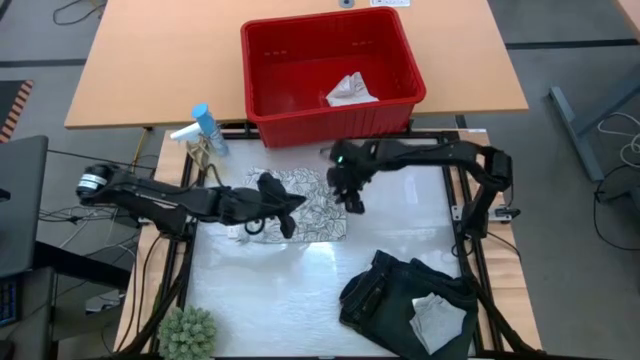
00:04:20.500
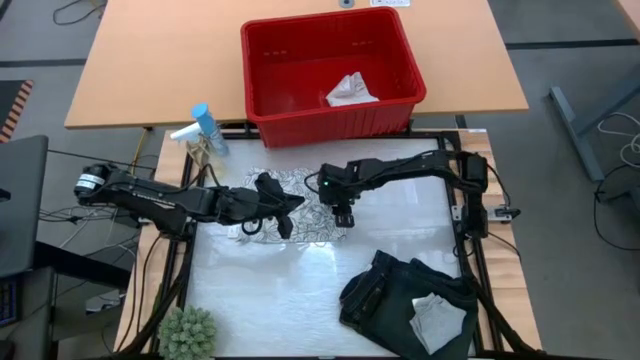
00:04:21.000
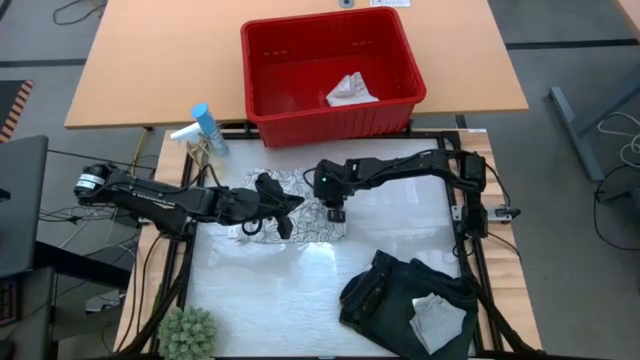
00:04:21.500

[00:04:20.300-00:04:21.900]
Task: Fold Laundry from Bin
Fold the white from the red laundry bin

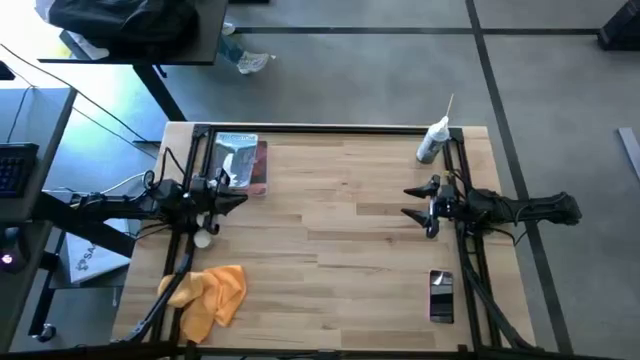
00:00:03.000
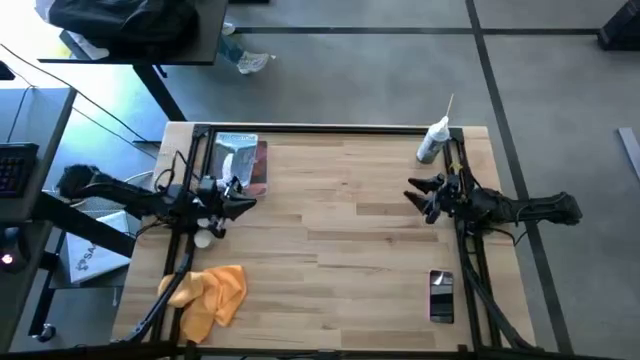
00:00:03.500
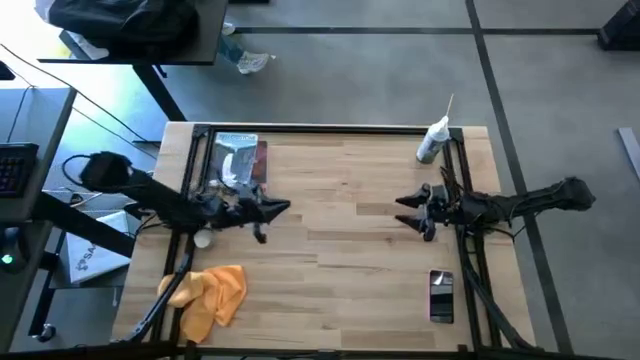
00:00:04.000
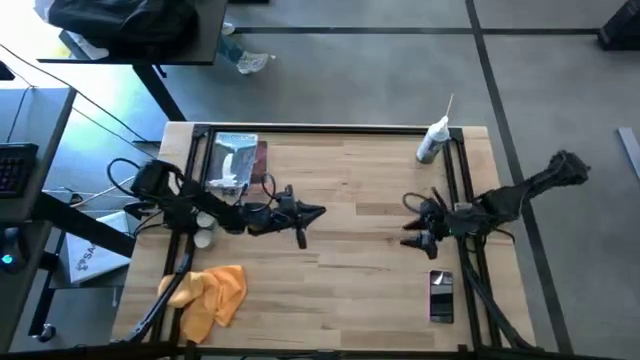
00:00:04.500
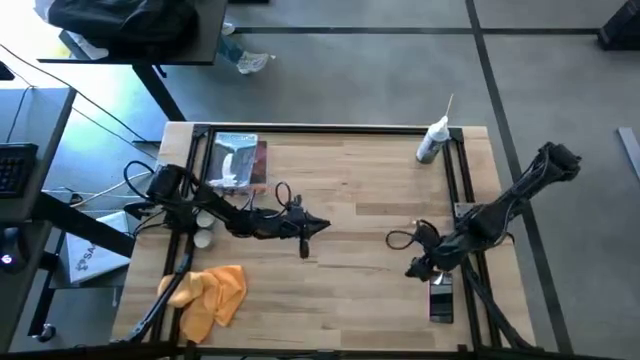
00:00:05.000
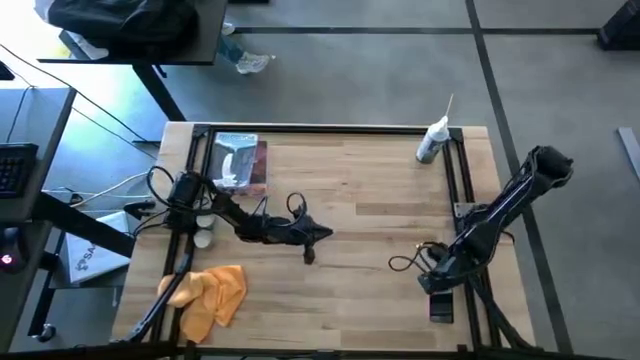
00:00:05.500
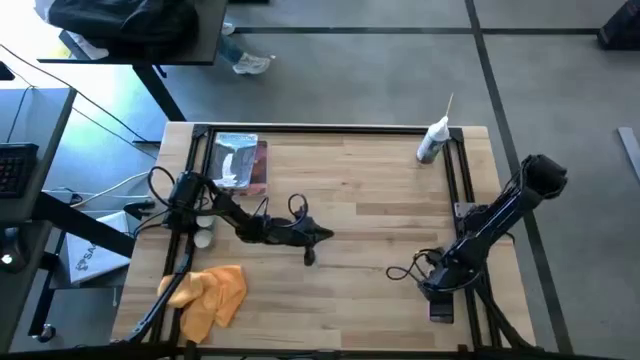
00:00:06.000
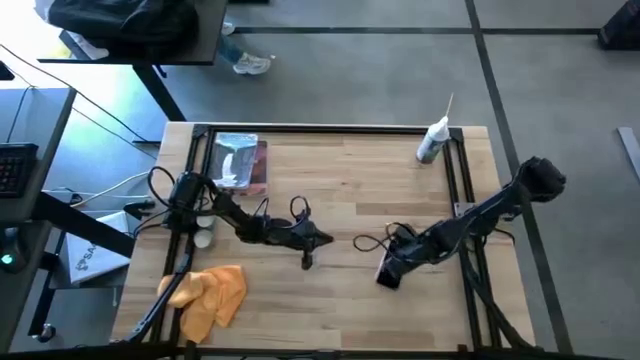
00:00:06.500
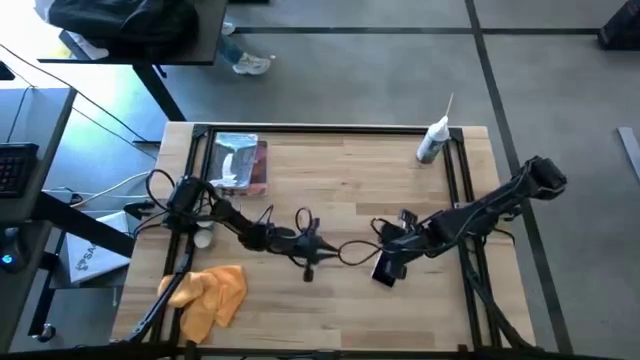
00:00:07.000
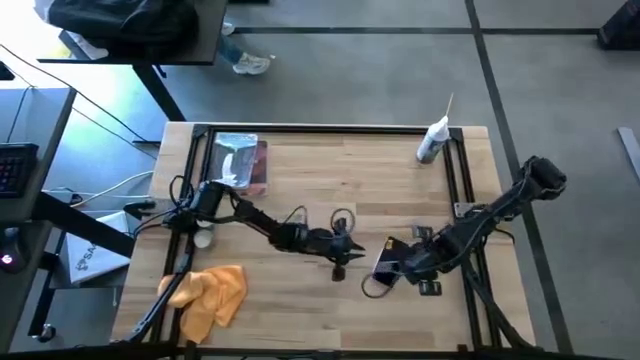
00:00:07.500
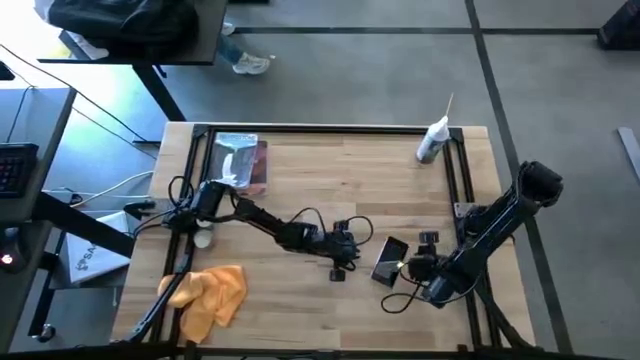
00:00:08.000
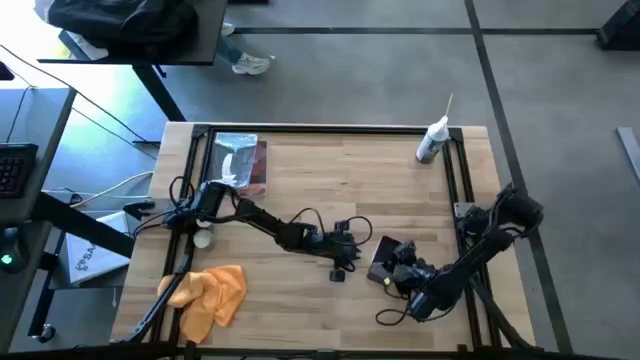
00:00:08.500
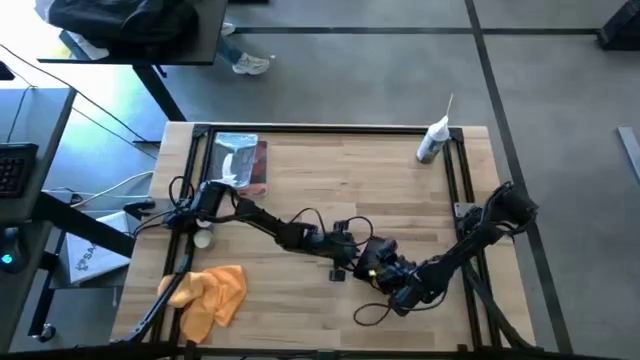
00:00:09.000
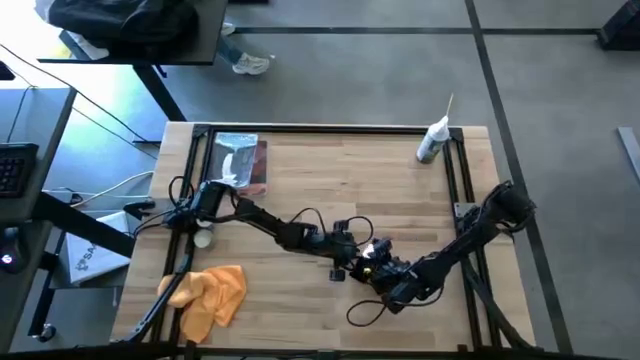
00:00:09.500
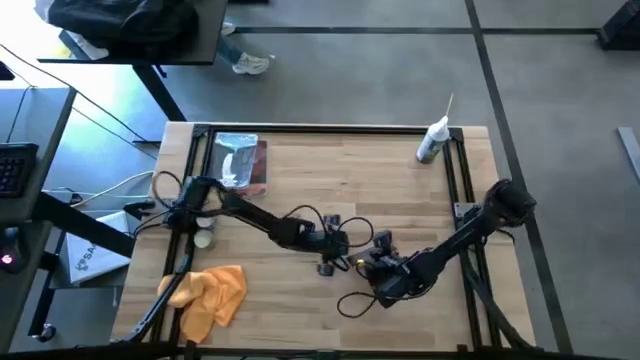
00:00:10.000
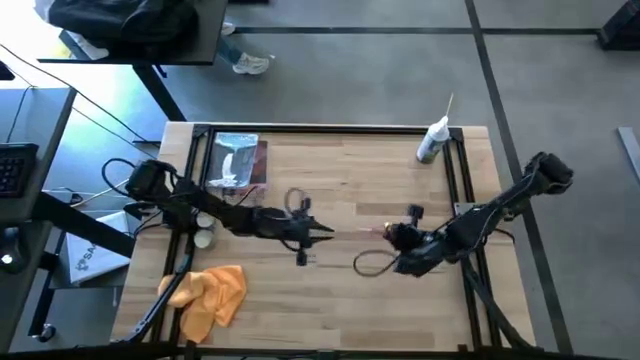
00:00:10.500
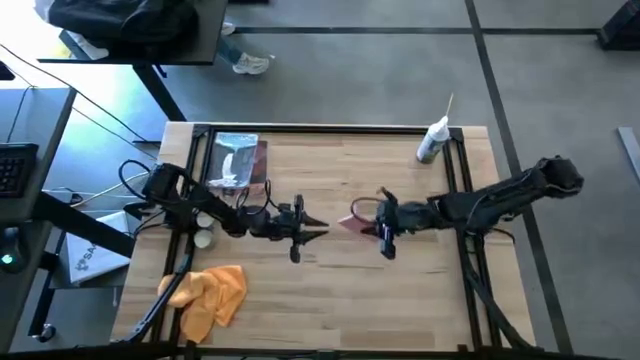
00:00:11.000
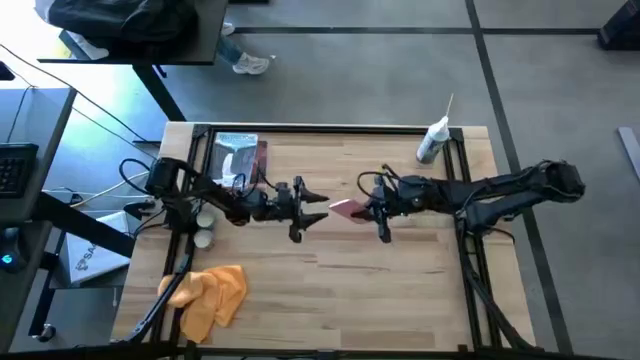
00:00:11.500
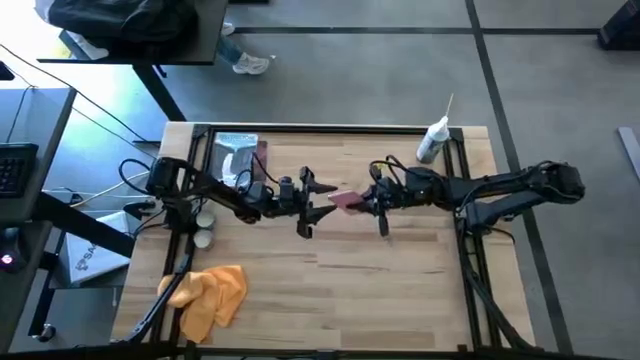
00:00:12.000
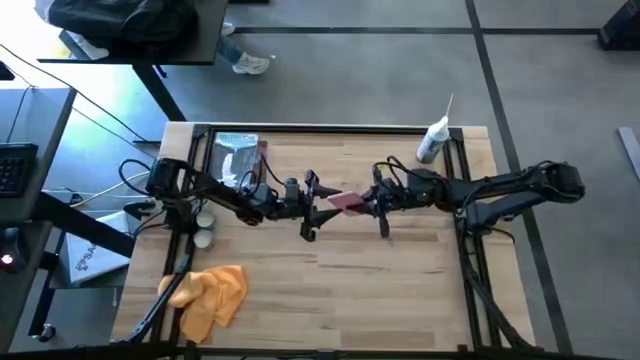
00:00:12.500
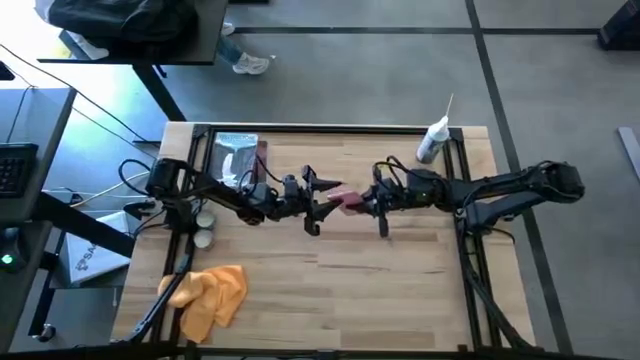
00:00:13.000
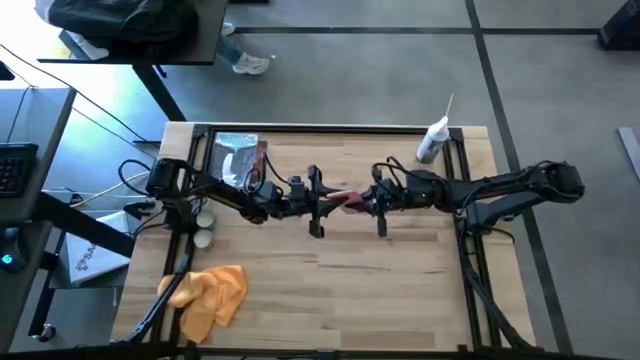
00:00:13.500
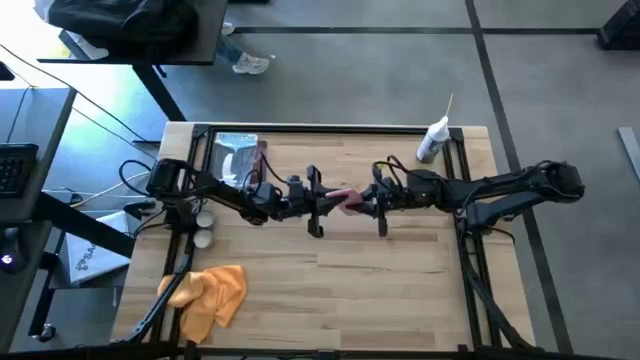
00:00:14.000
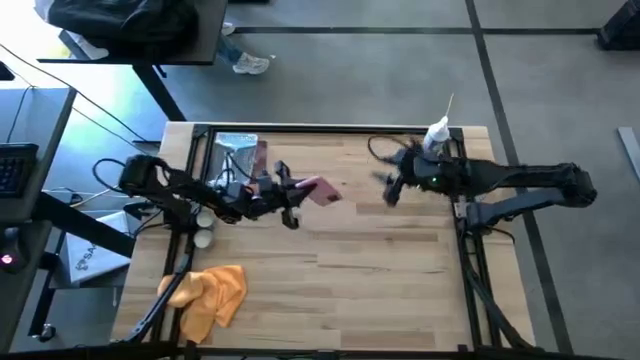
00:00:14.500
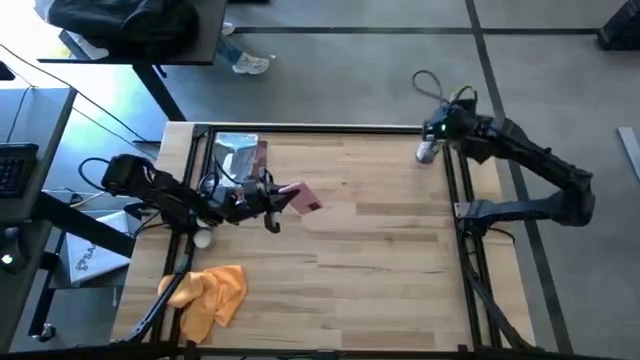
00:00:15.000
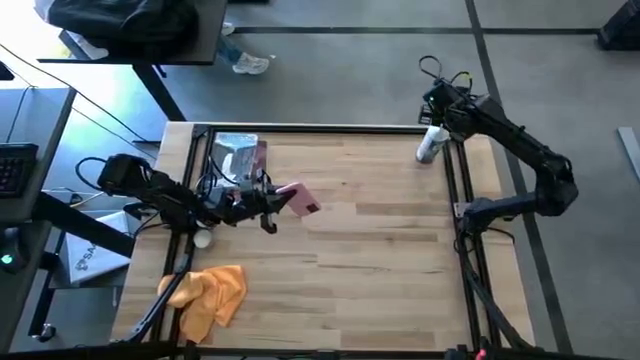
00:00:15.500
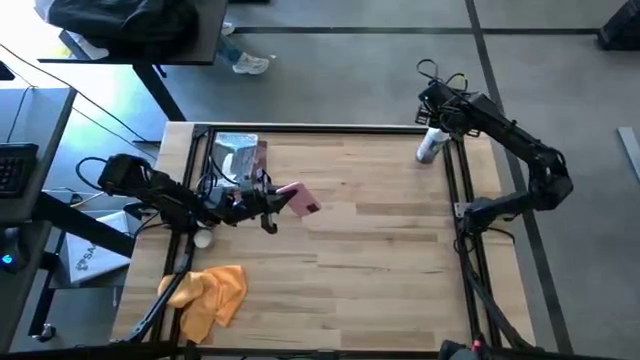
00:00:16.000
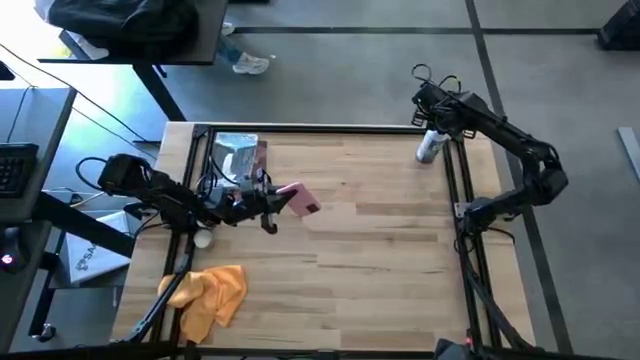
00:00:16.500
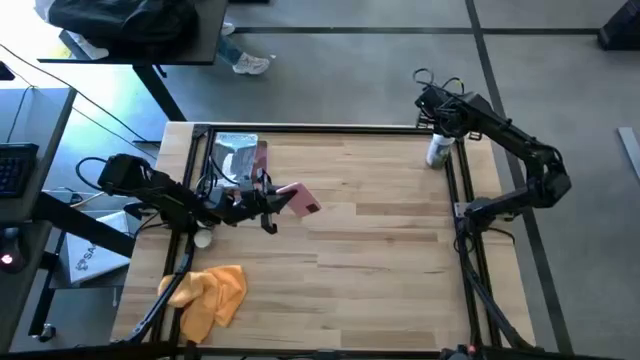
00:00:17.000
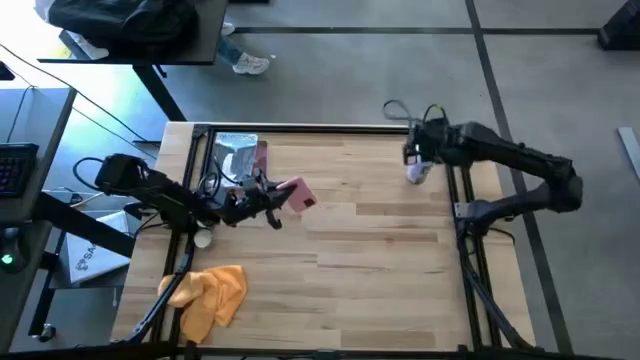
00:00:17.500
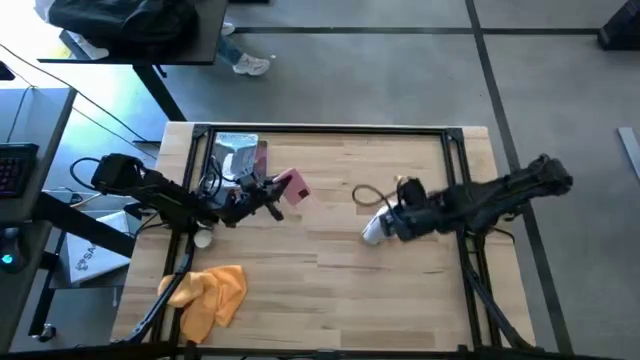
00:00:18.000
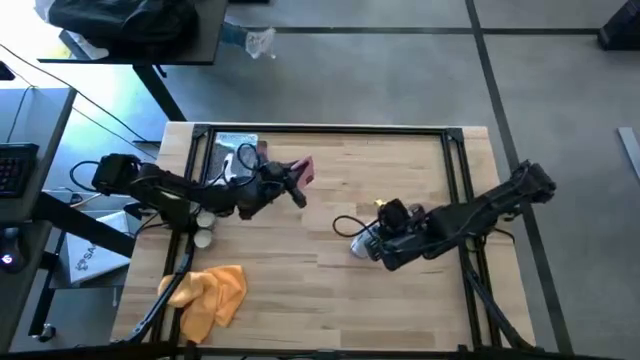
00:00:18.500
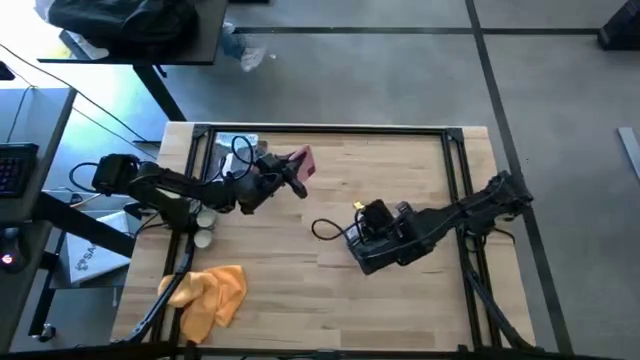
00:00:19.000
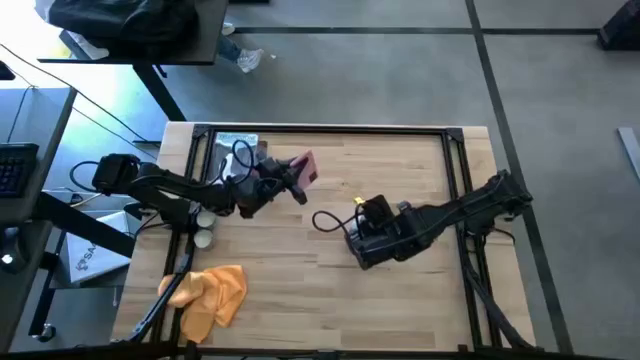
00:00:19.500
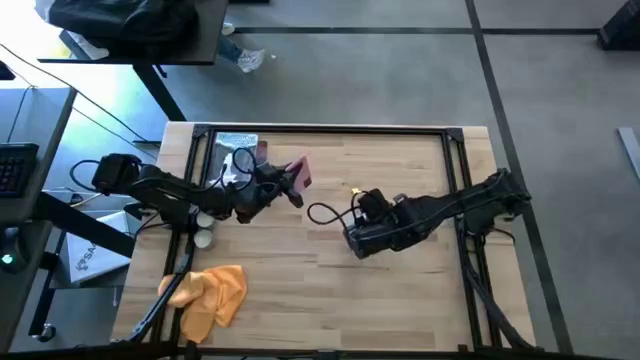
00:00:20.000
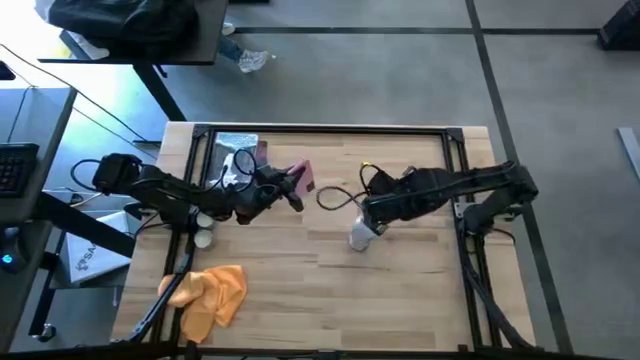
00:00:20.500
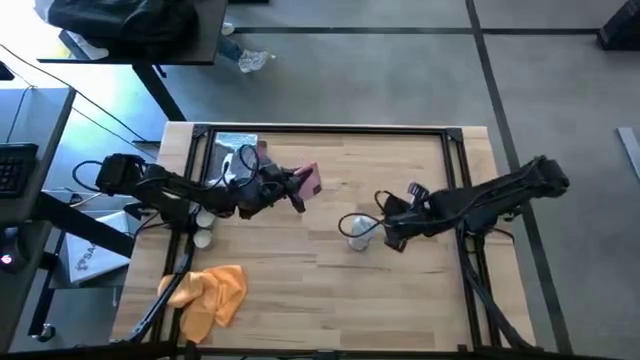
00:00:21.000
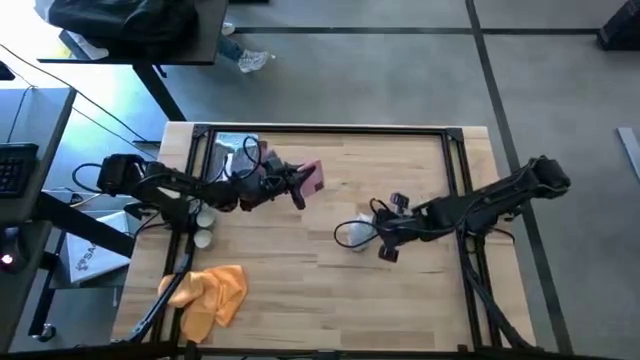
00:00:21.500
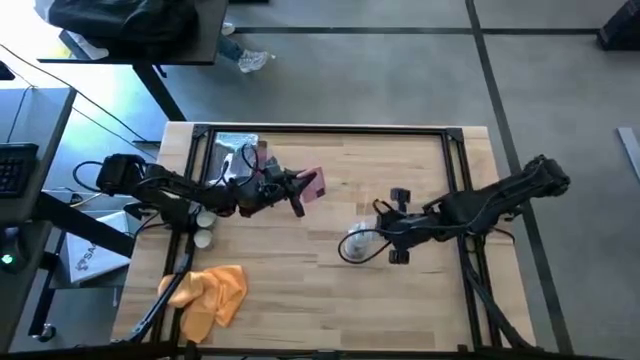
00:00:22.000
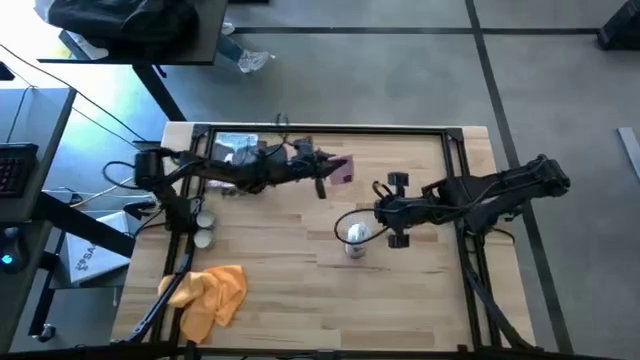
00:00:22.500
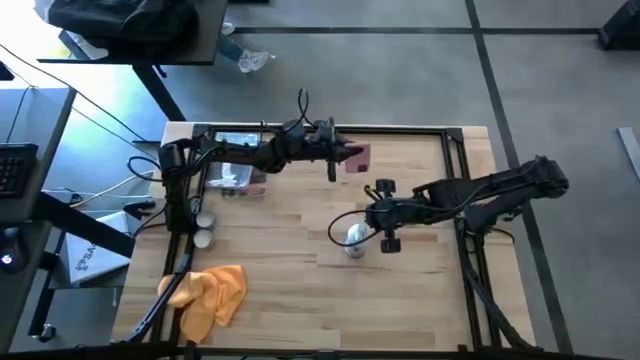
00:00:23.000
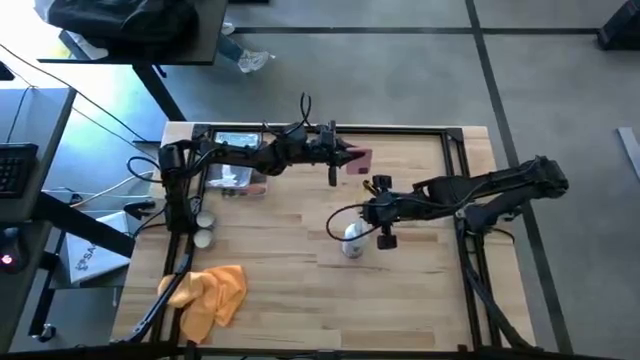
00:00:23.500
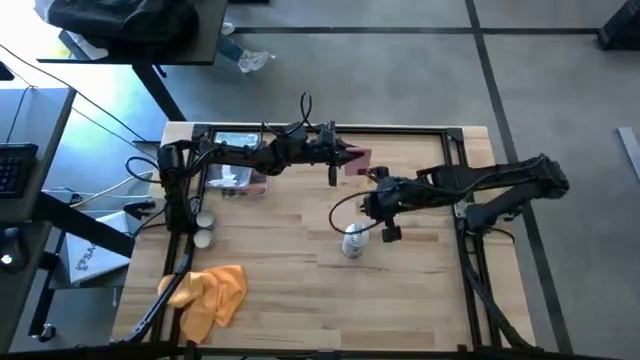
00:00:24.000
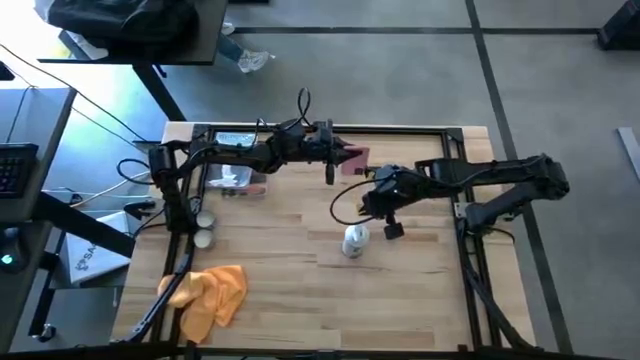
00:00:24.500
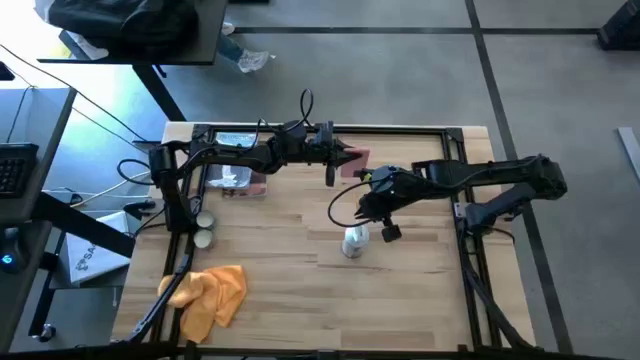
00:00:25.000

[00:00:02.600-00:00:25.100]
Task: Apply microfiber cloth
Spray the cellphone on the front and back using the spray bottle
